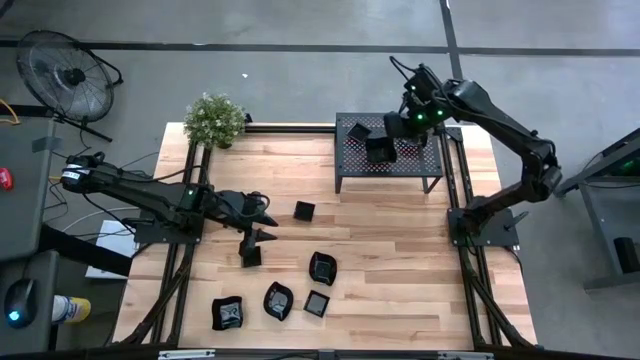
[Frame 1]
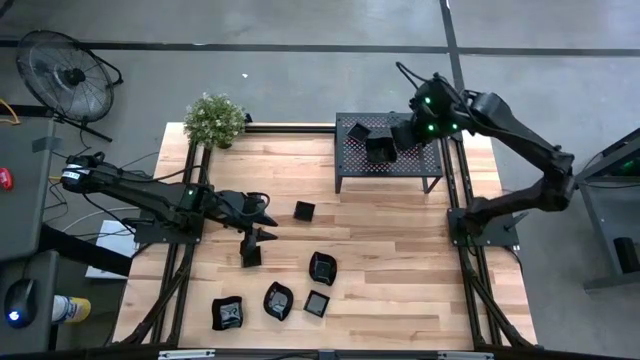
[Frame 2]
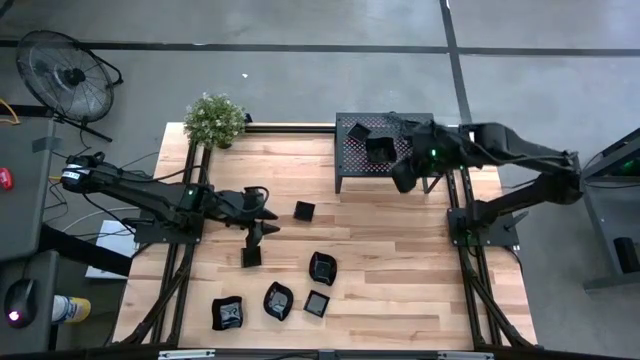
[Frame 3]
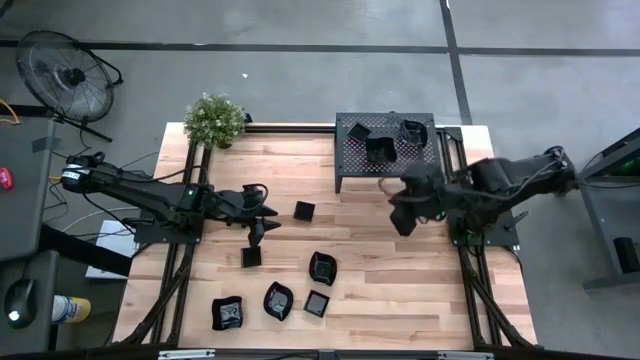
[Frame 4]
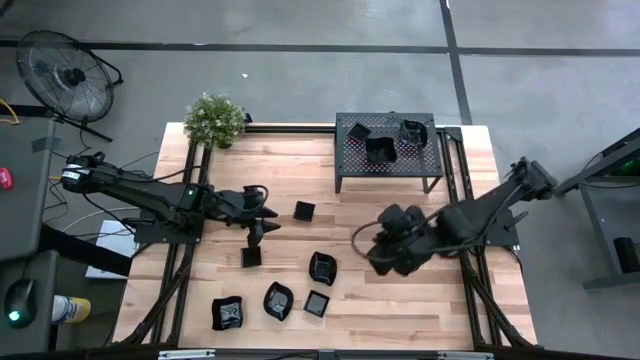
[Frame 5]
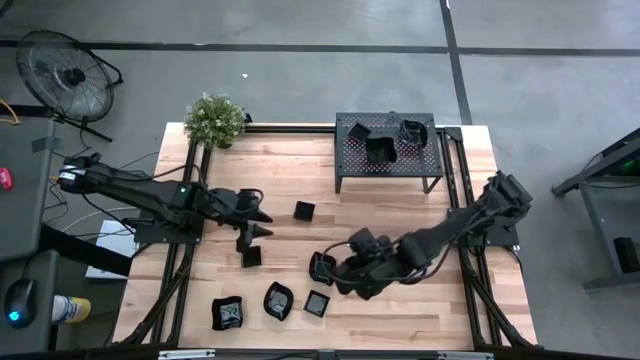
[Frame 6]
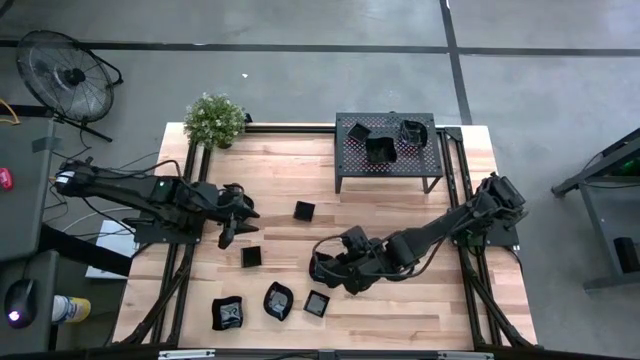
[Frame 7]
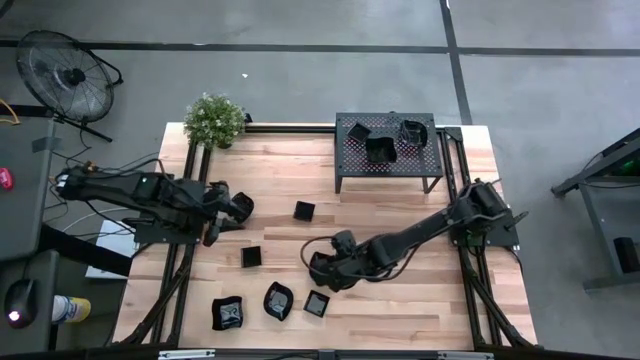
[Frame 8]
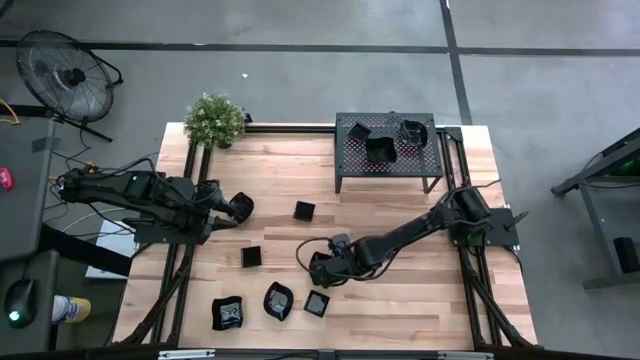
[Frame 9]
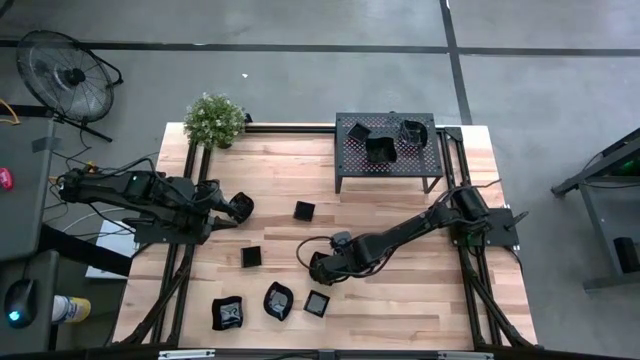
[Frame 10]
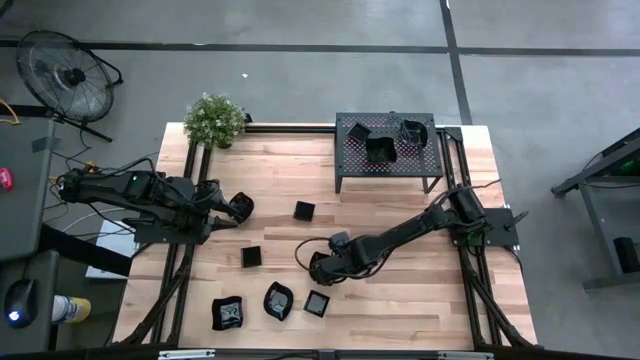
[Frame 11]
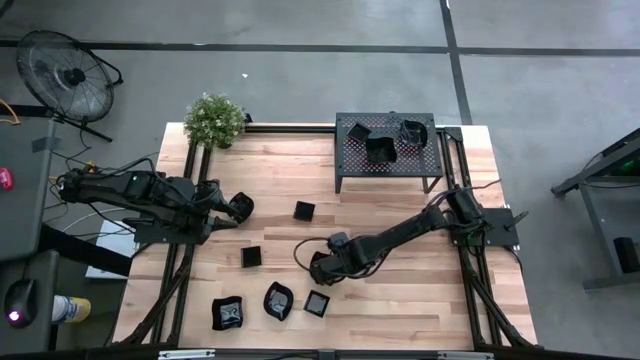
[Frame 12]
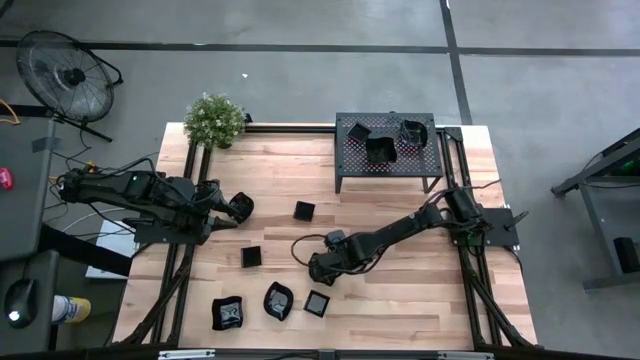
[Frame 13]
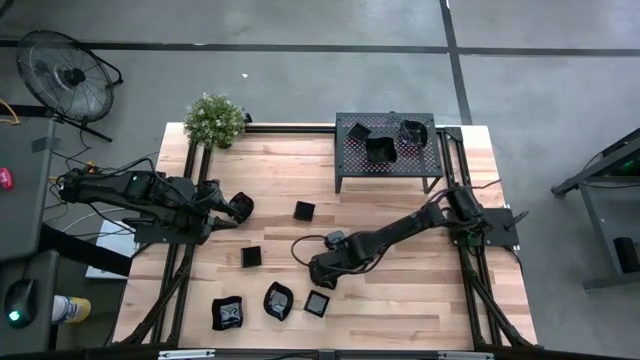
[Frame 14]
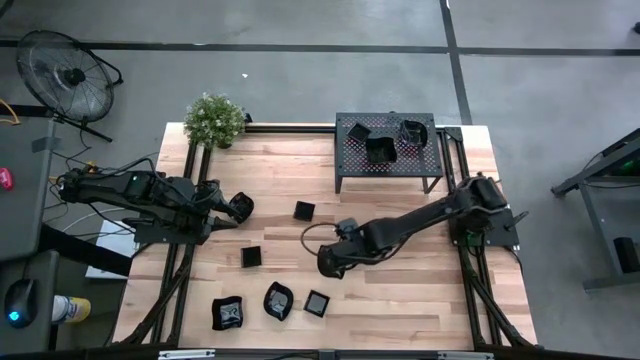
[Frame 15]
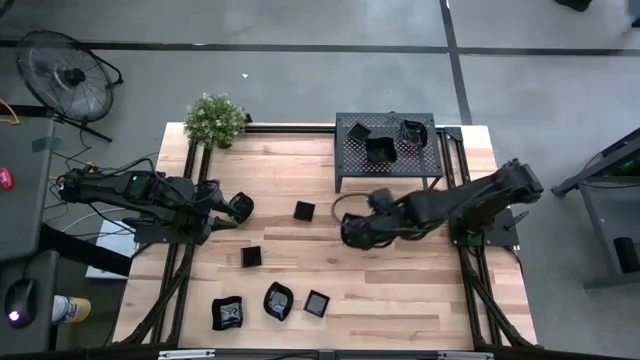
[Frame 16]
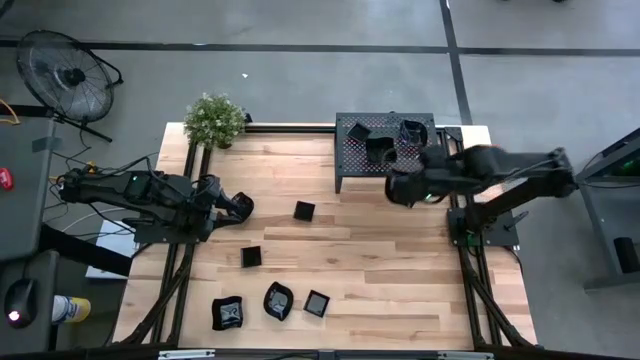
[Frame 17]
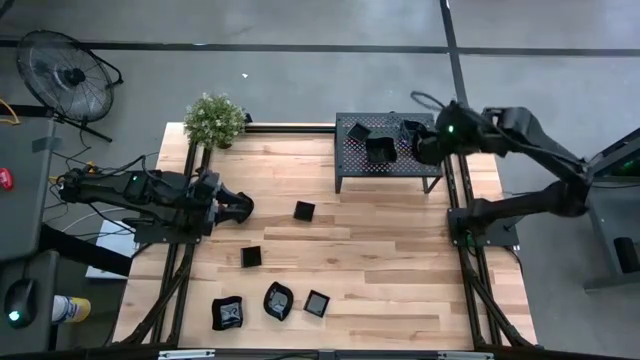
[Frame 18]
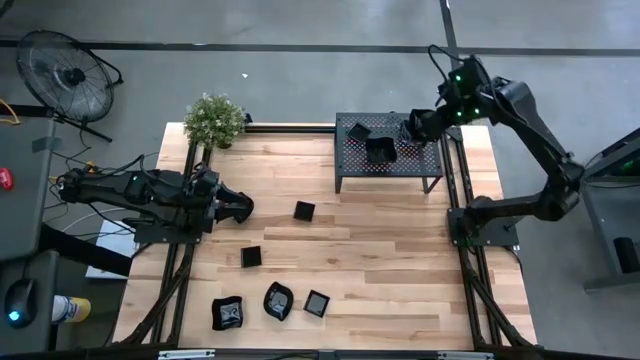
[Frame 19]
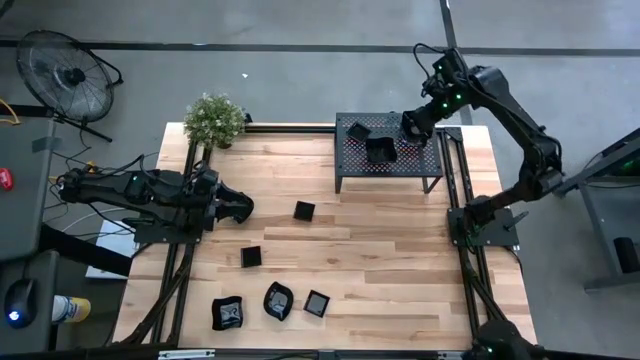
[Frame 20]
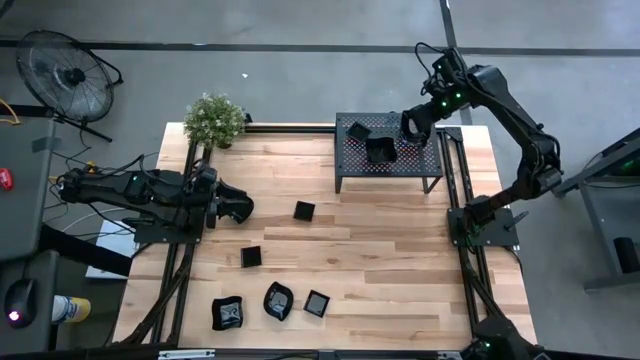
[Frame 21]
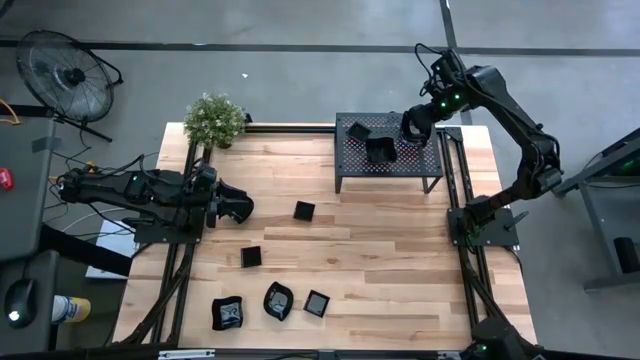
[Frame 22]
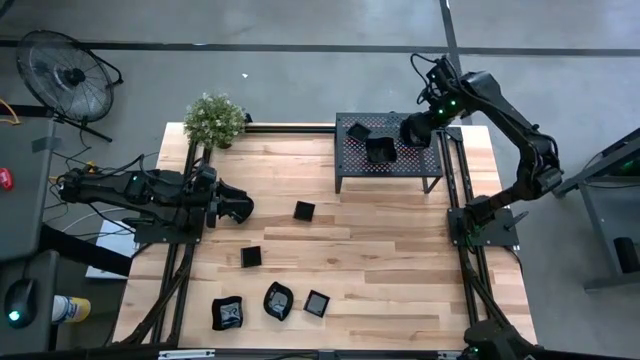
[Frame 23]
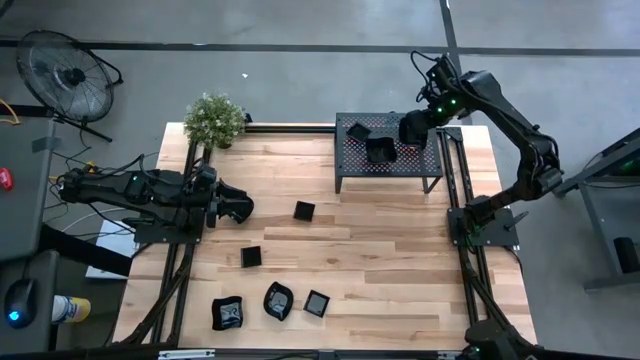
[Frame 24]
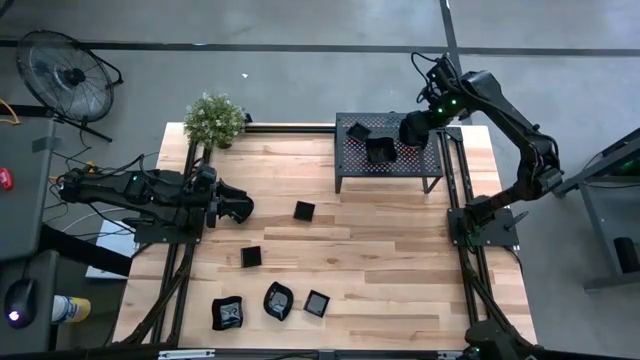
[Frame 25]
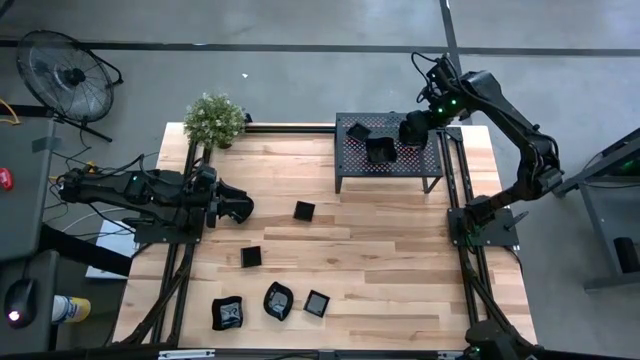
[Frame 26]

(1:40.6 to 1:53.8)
Task: Pick & Place Mini shaped plates
Stack the black leaf-shaped plate on top of the black leaf-shaped plates on the shelf

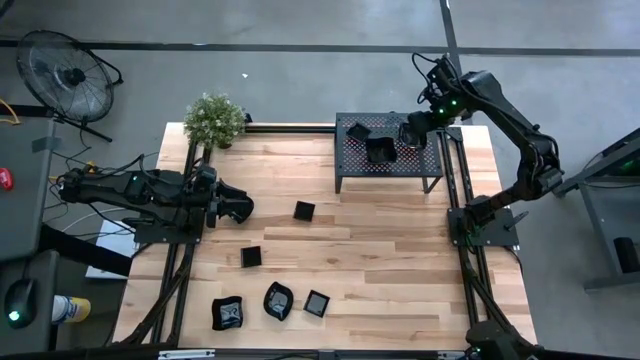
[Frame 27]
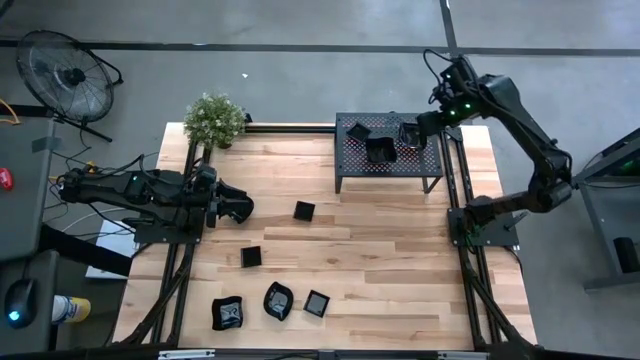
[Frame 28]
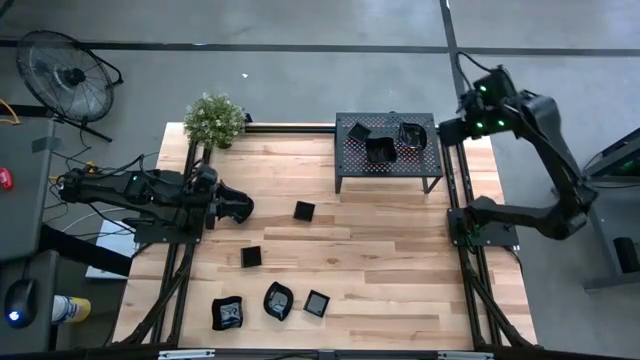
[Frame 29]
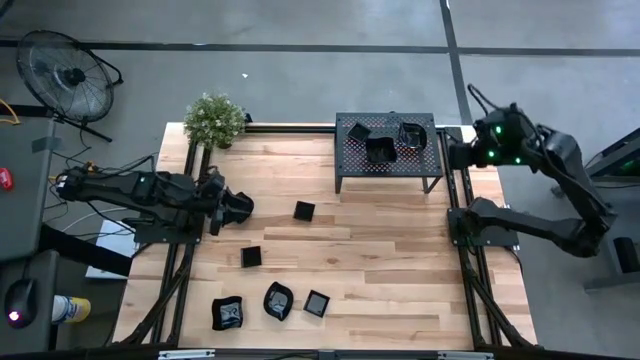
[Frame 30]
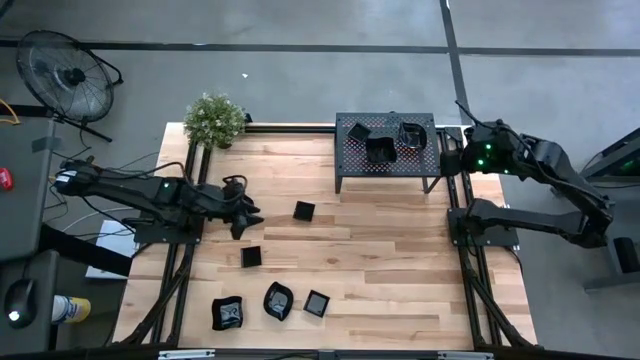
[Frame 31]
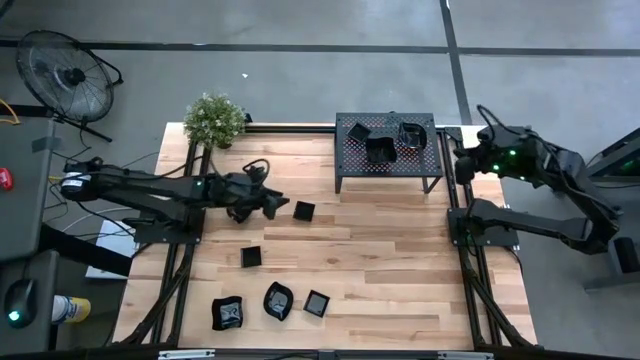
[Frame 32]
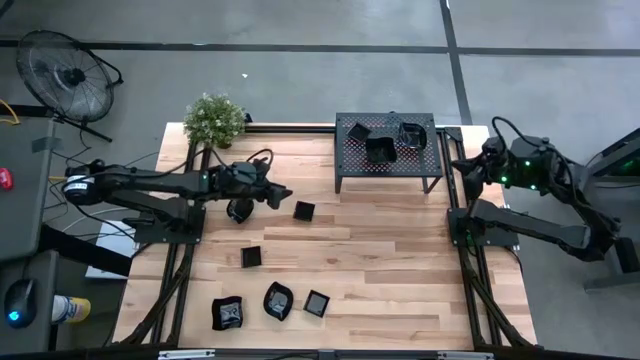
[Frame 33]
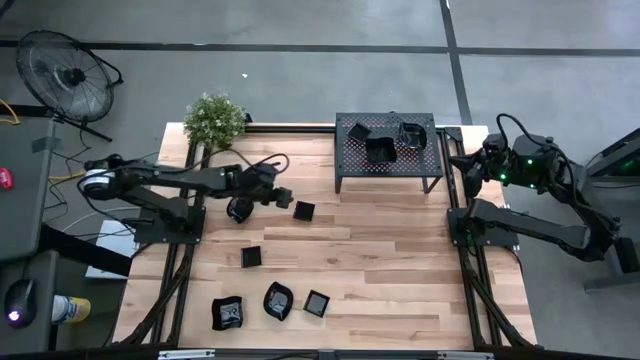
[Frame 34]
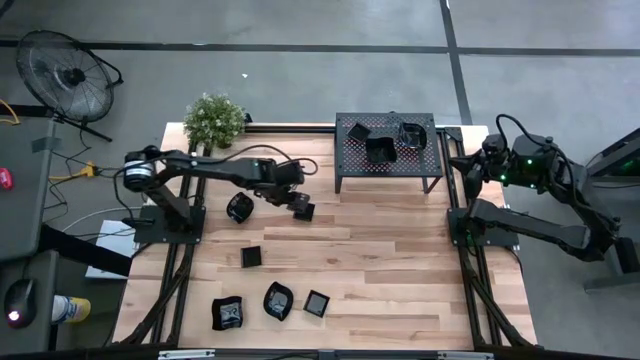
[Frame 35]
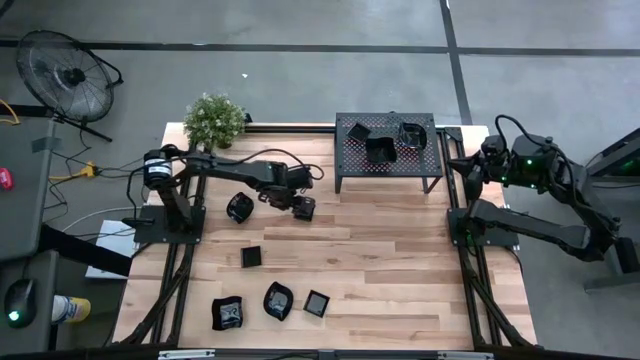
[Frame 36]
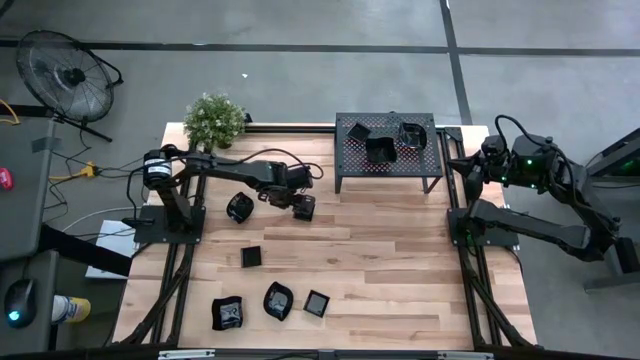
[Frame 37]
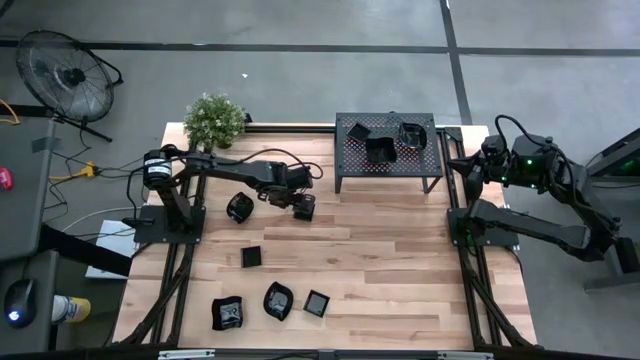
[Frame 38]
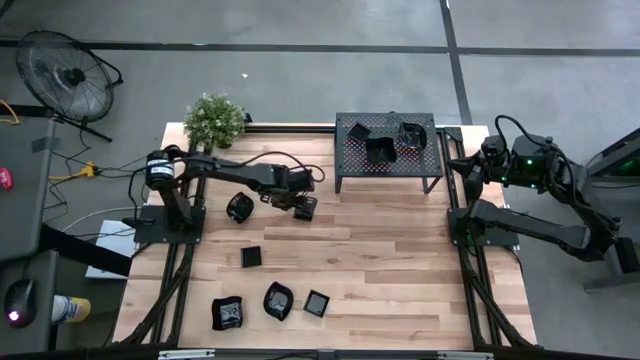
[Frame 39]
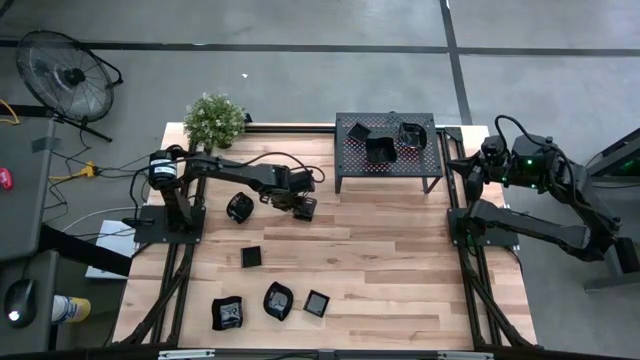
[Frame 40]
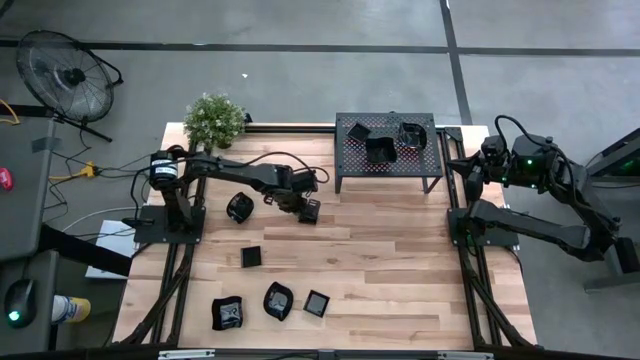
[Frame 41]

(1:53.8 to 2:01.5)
Stack the black square plate on top of the black square plates on the shelf
